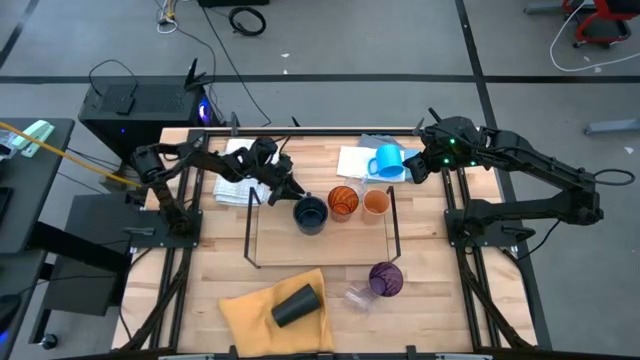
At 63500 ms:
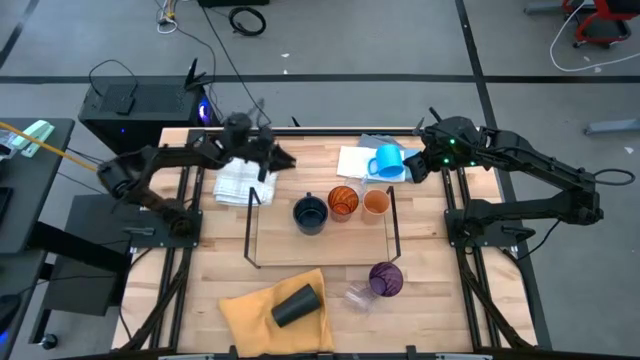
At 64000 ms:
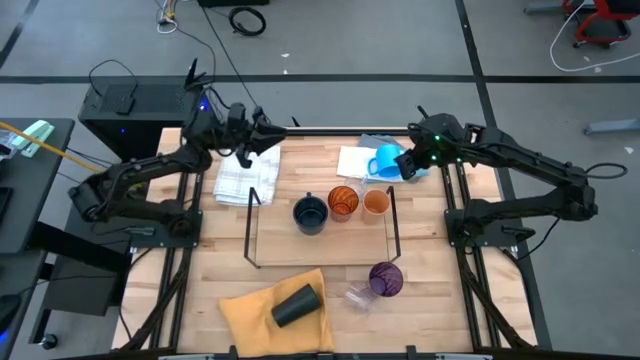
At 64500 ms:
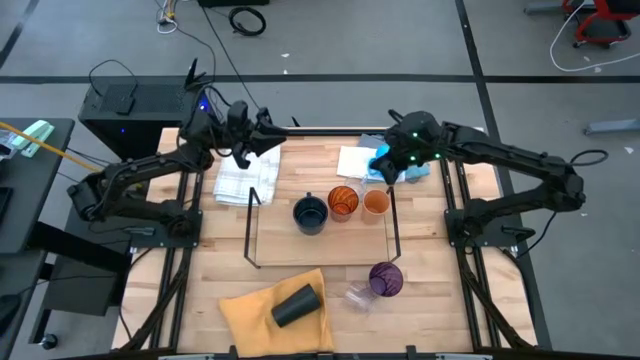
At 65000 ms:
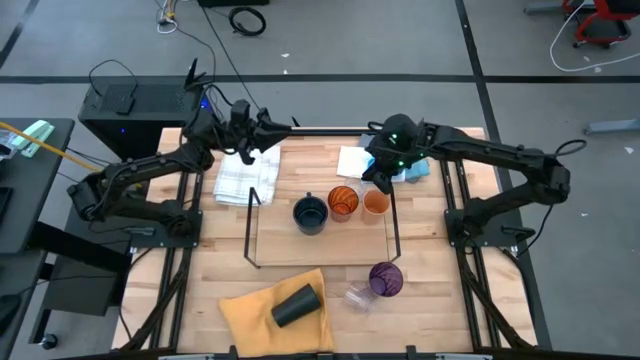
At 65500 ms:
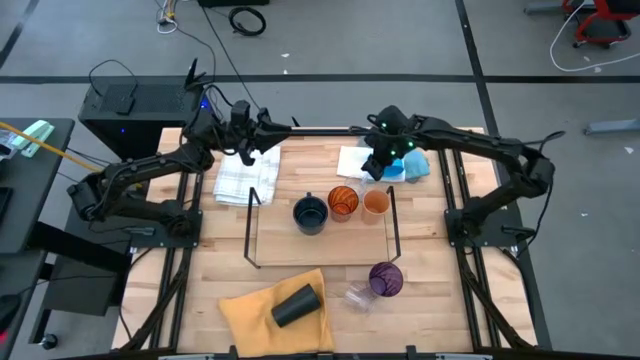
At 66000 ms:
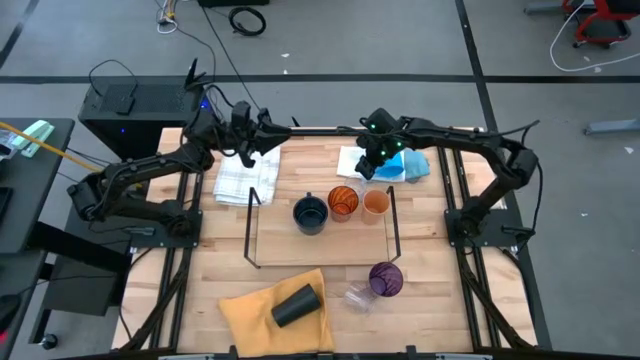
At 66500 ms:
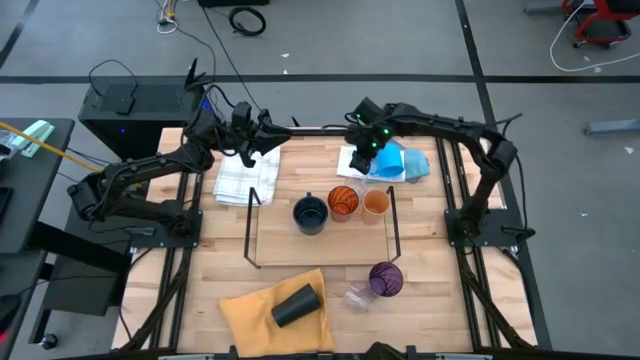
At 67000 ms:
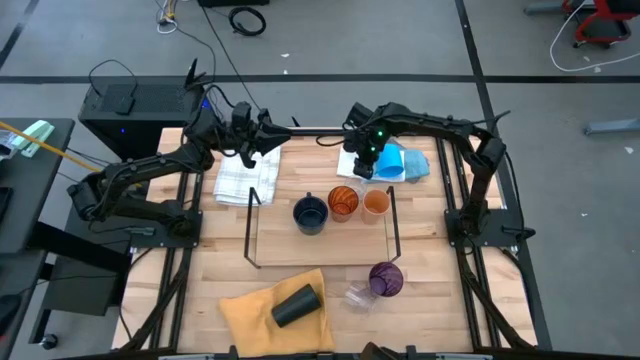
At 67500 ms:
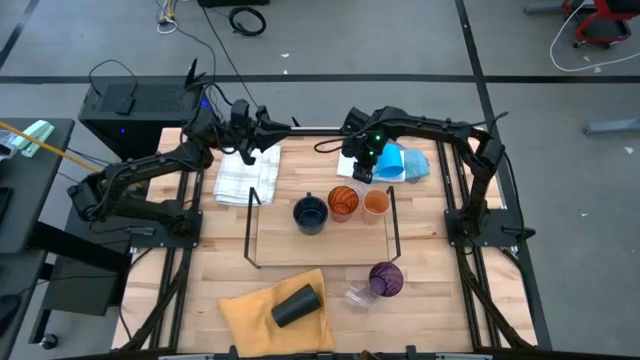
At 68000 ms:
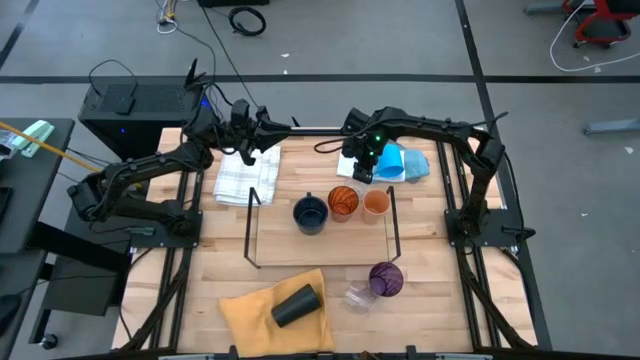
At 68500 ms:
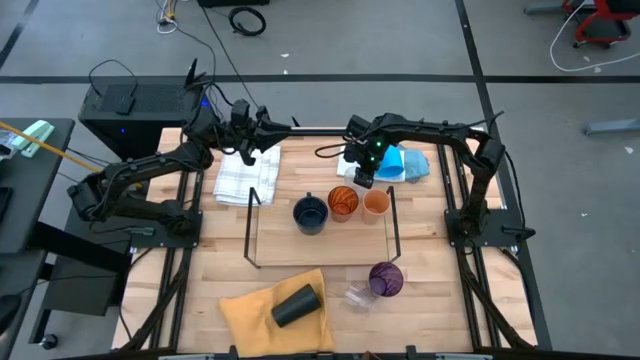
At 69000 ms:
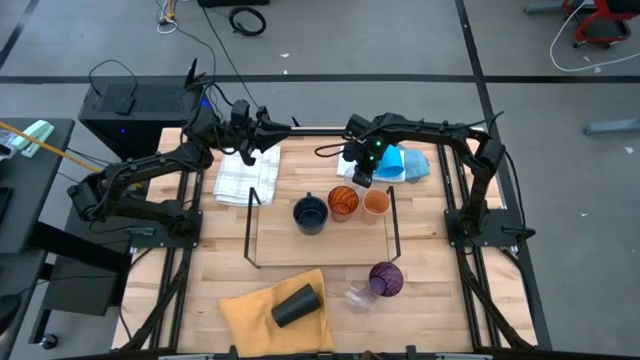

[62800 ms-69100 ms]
Task: Stack small to large cups/mugs on shelf
Put the top transparent cup on the shelf

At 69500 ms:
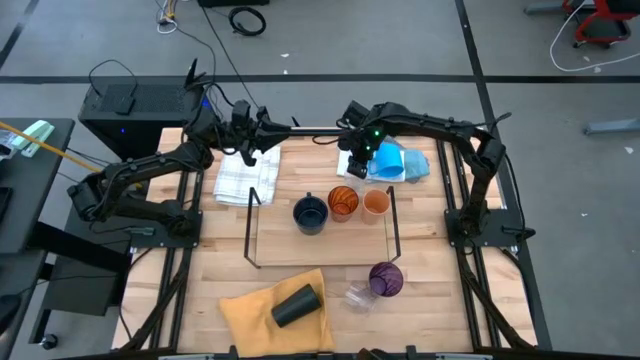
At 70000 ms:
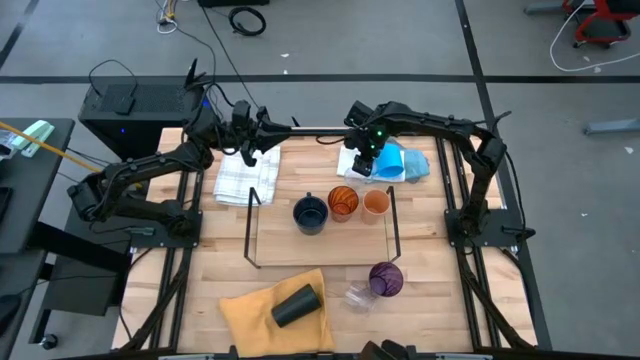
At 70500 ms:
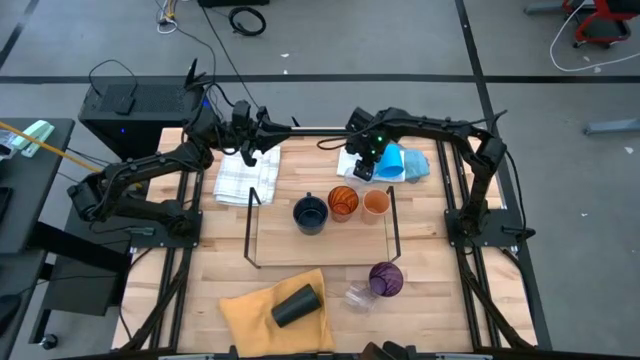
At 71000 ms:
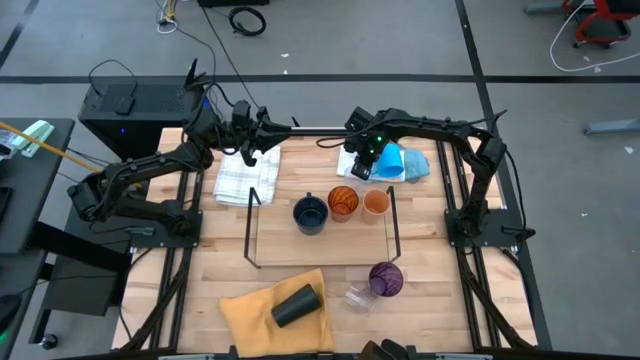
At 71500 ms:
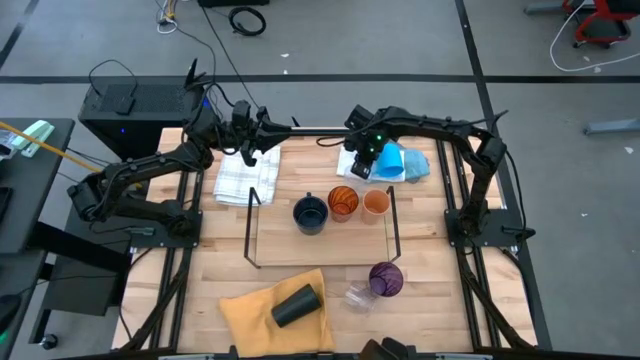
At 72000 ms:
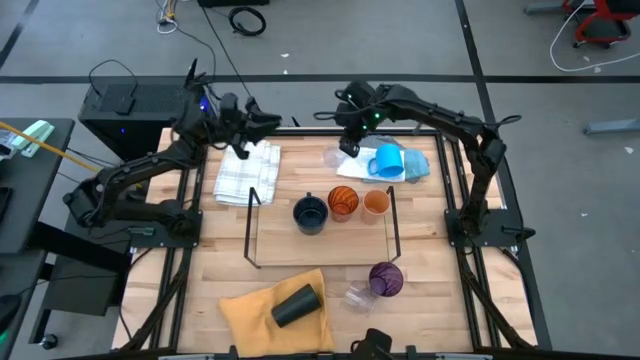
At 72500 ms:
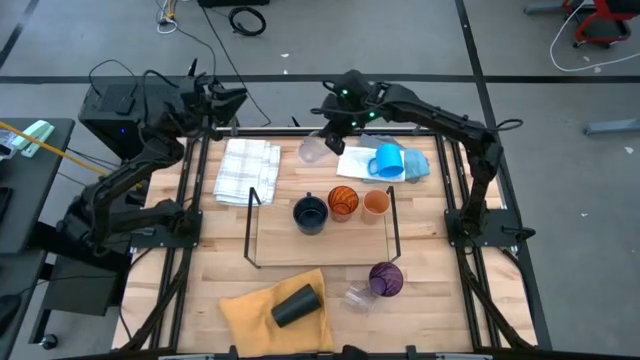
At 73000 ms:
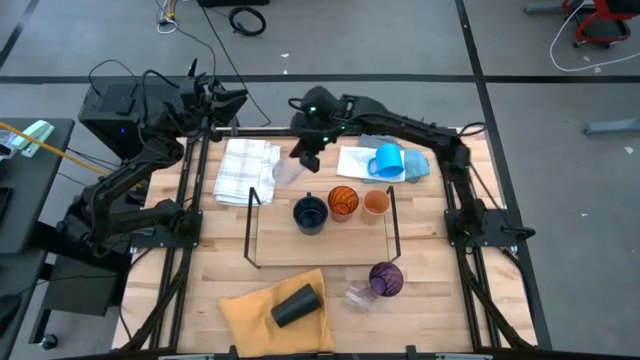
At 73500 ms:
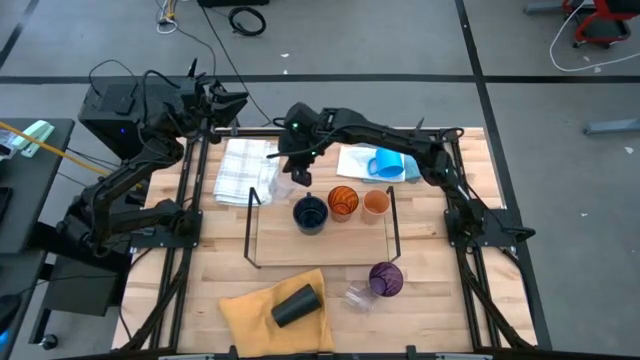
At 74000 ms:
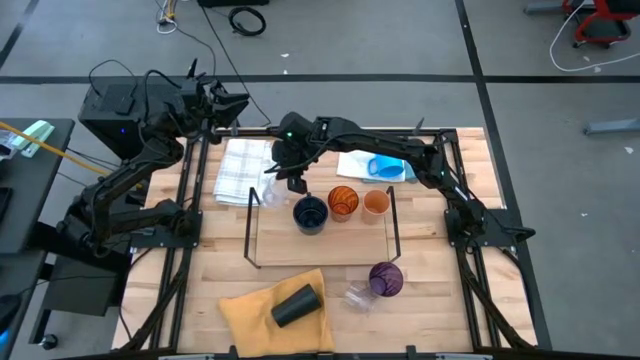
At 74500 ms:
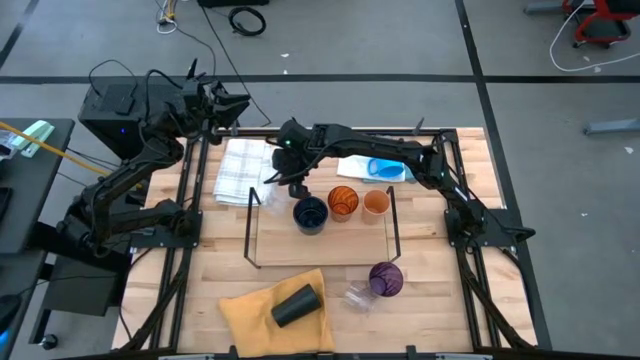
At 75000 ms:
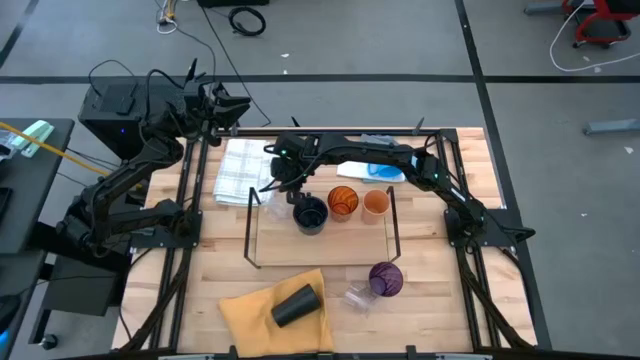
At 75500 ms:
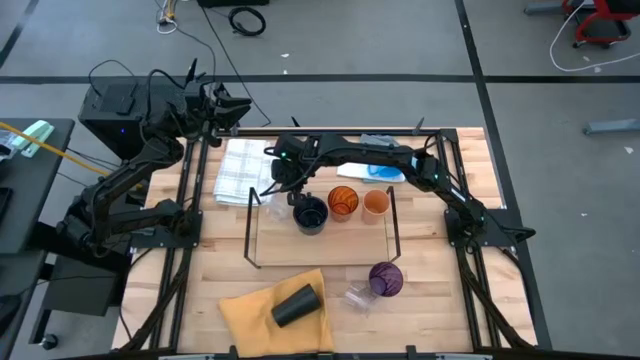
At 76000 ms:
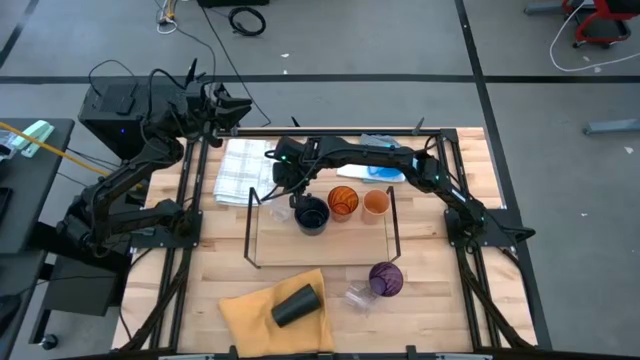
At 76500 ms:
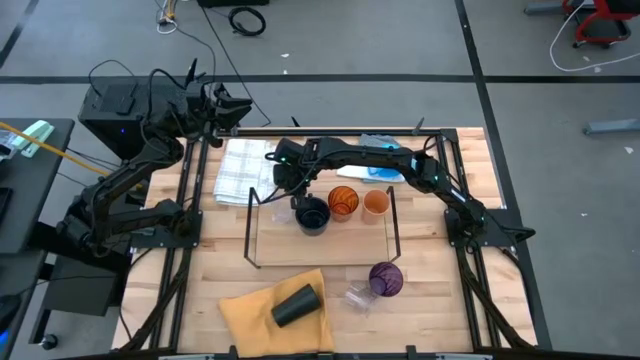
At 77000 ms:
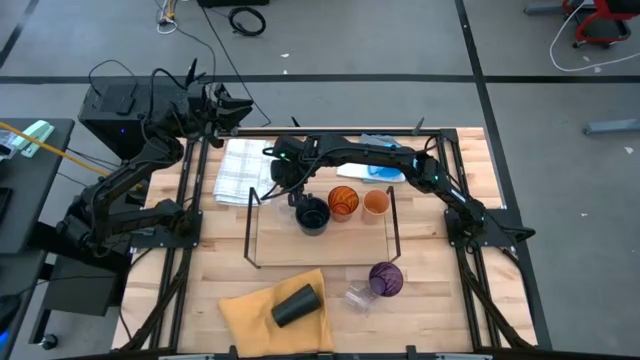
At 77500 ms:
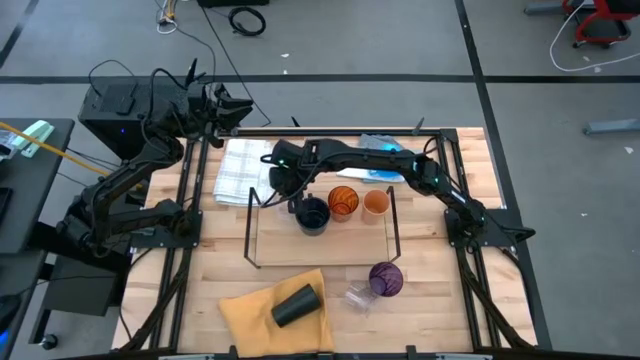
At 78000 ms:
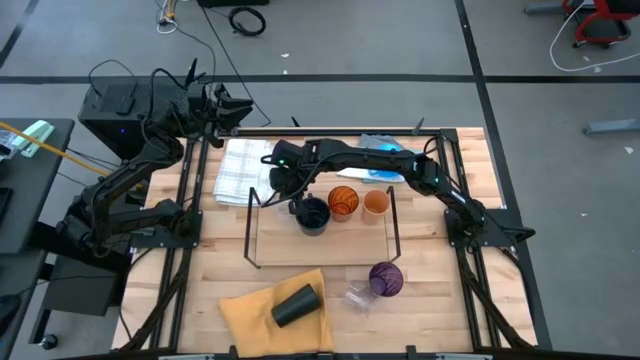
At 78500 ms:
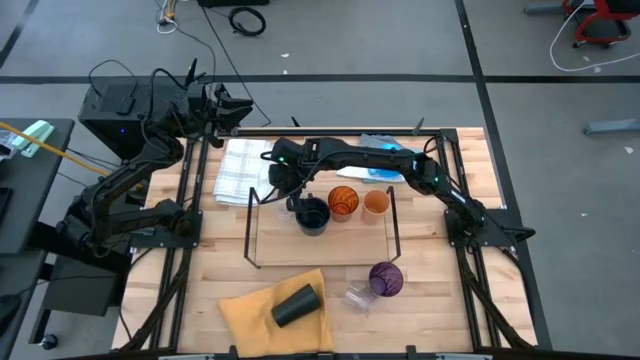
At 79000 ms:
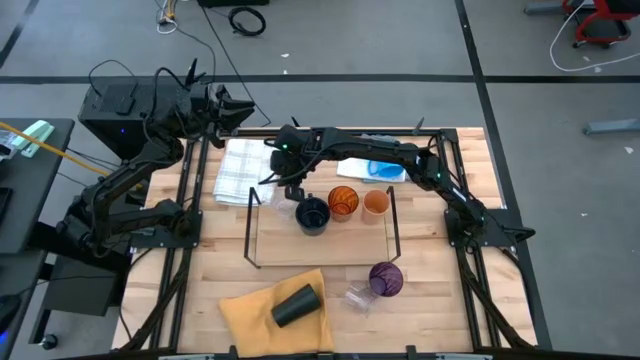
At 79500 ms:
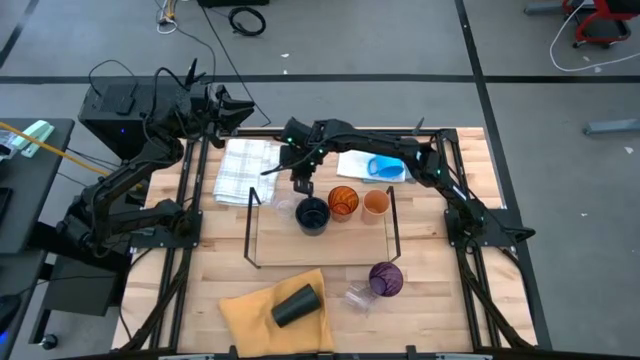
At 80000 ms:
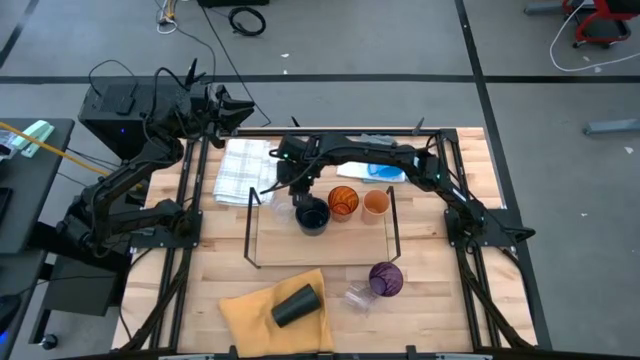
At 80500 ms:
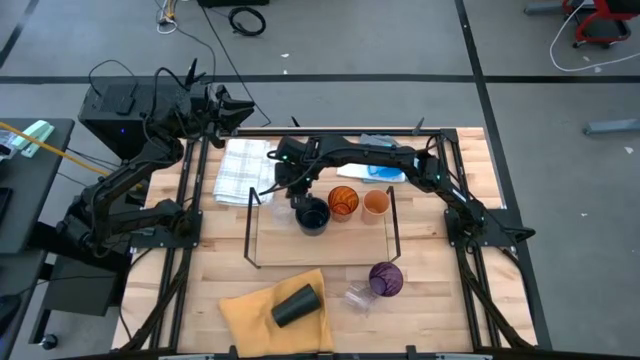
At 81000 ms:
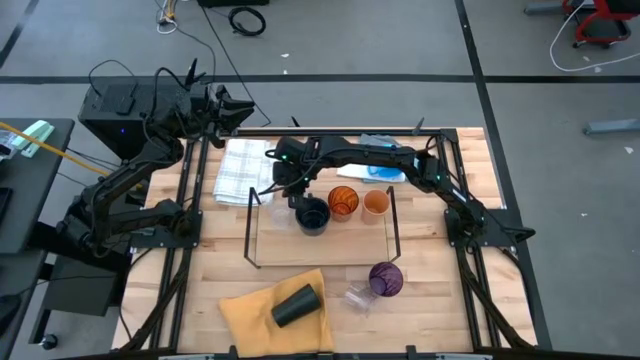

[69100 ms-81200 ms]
Put the top transparent cup on the shelf

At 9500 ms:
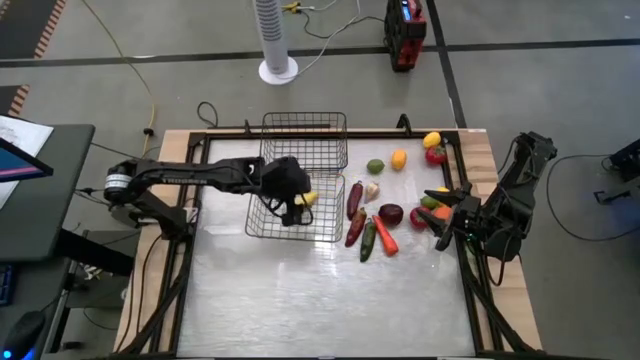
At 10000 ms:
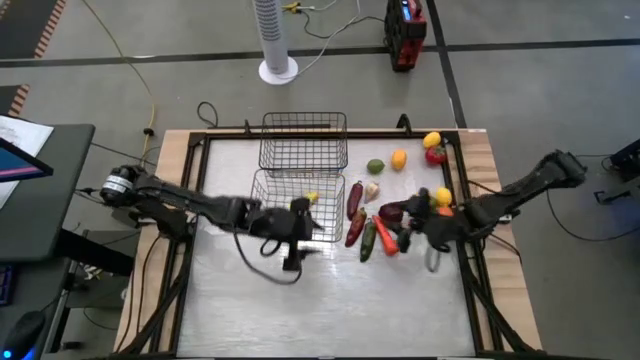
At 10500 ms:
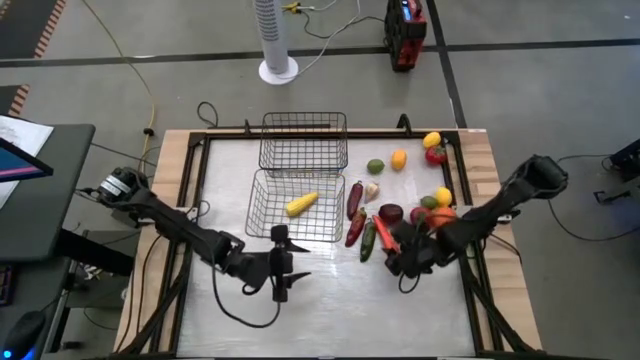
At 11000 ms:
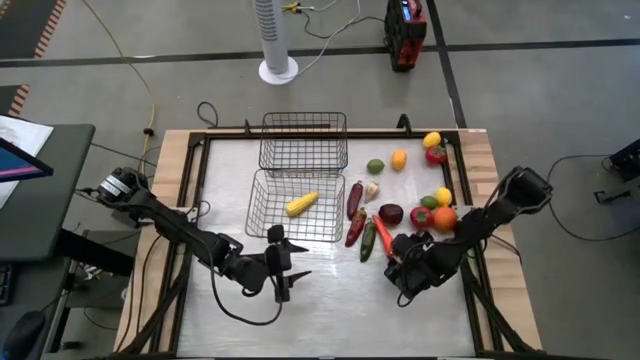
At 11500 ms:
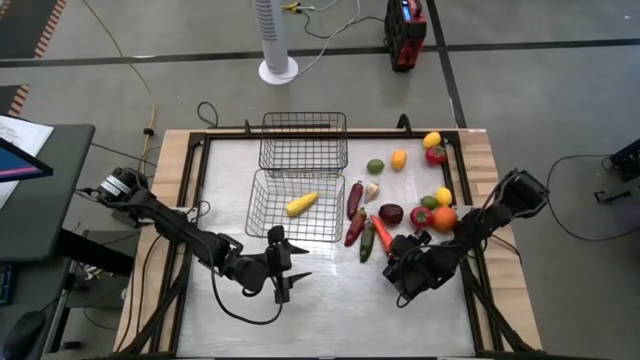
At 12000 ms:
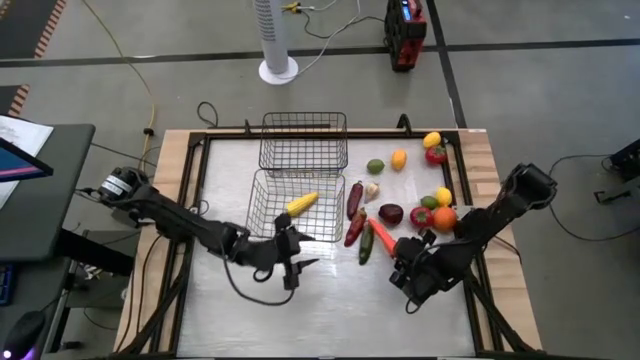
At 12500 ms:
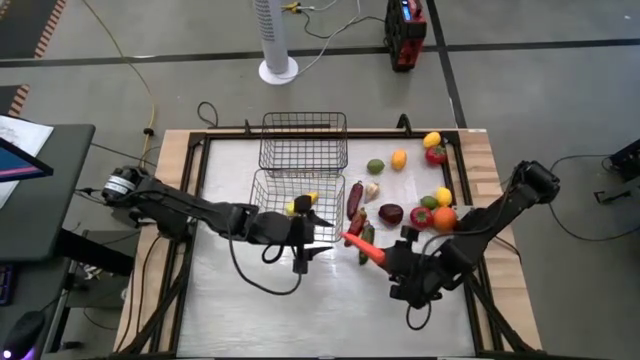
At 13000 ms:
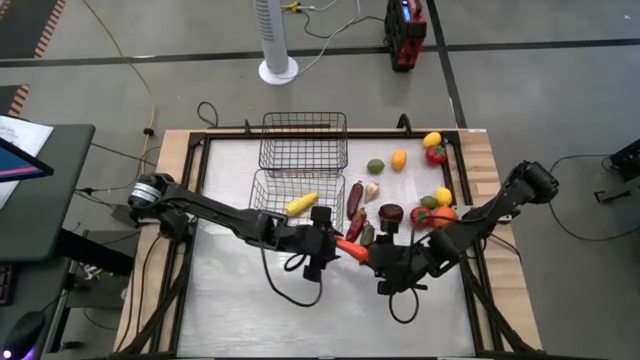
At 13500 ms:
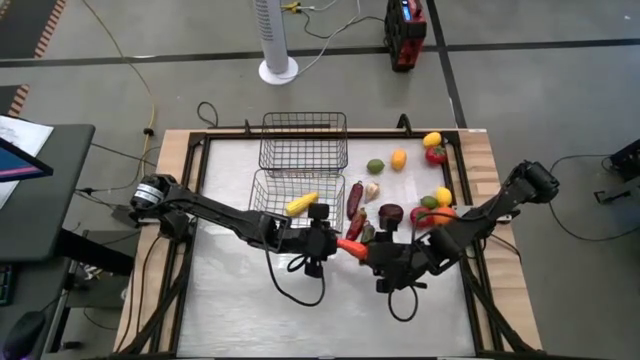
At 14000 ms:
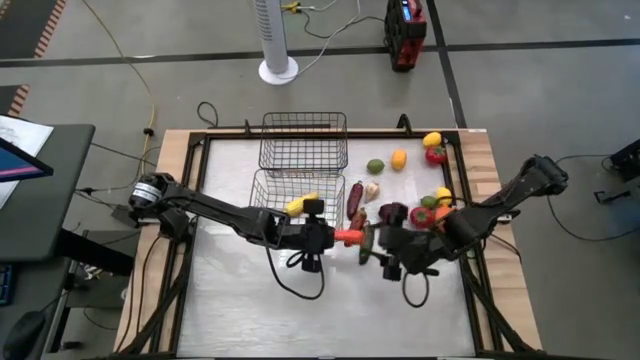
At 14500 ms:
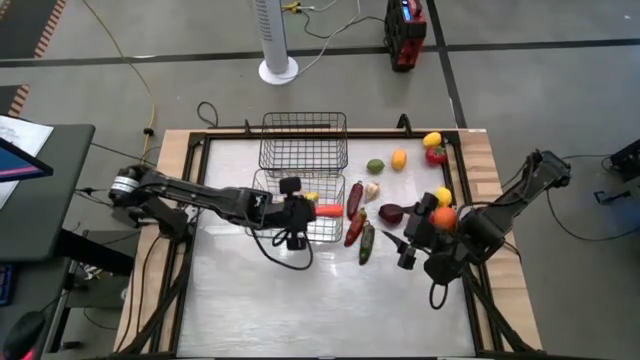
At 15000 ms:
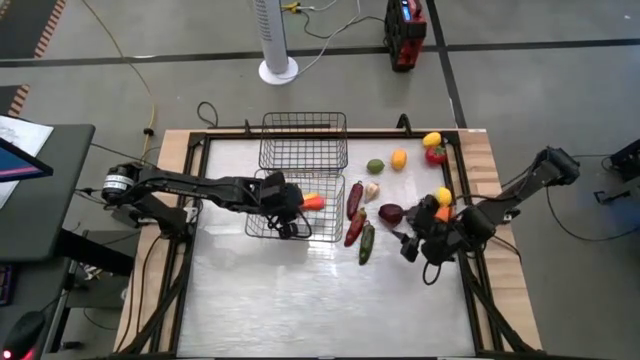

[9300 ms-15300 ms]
Task: Sort produce into baskets
Put the carrot into the bottom wire basket
